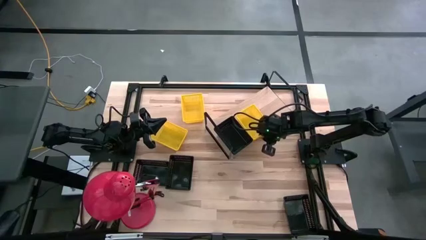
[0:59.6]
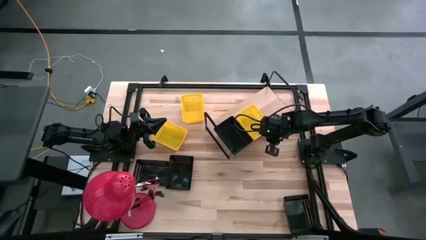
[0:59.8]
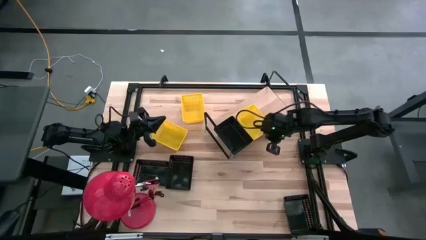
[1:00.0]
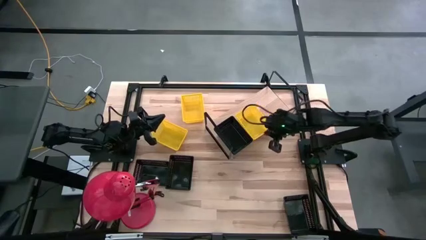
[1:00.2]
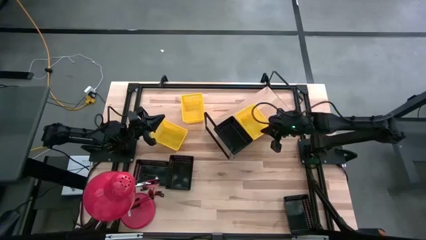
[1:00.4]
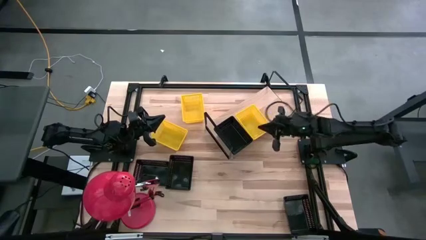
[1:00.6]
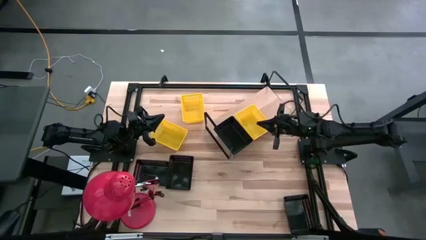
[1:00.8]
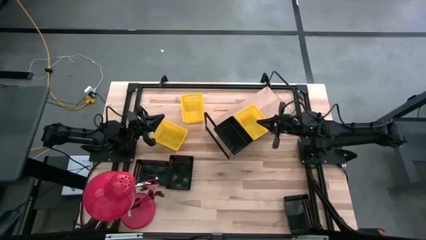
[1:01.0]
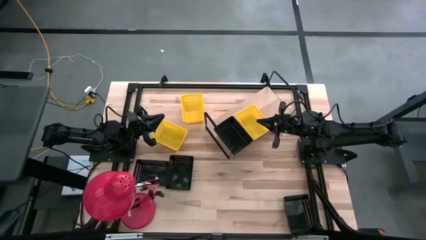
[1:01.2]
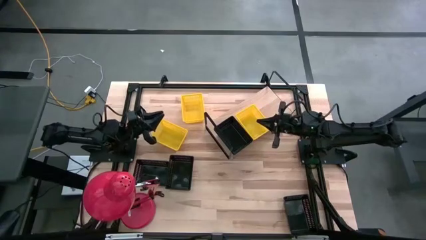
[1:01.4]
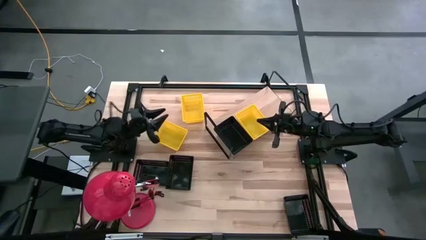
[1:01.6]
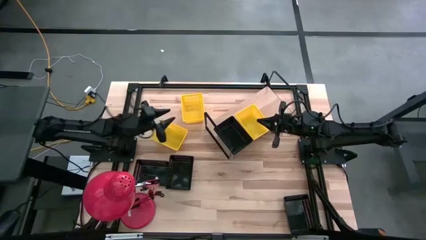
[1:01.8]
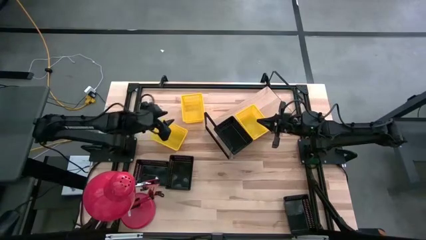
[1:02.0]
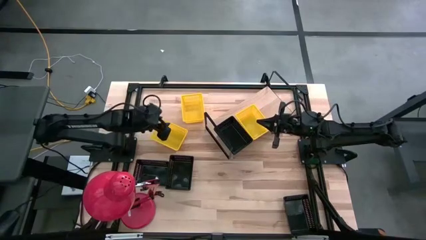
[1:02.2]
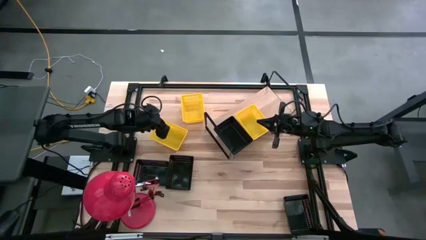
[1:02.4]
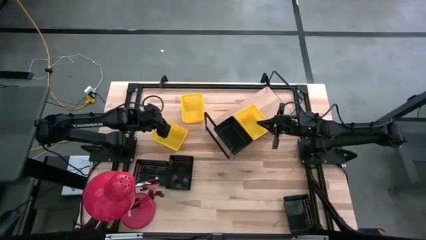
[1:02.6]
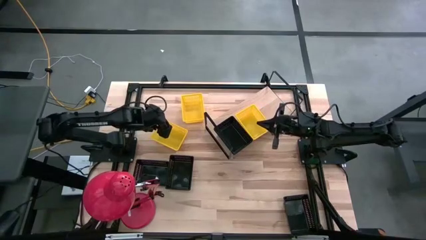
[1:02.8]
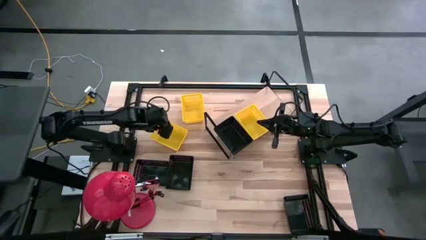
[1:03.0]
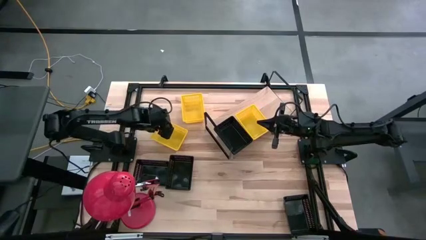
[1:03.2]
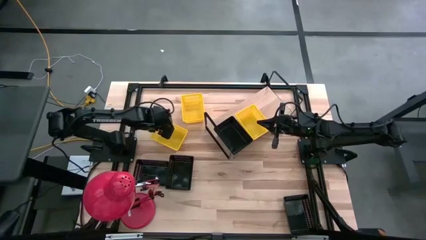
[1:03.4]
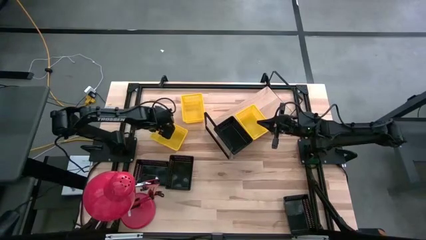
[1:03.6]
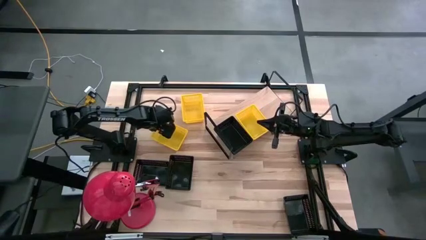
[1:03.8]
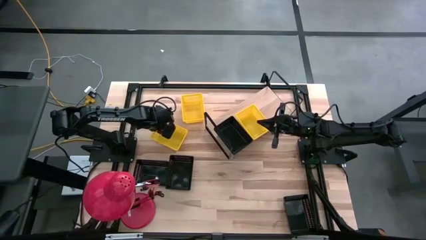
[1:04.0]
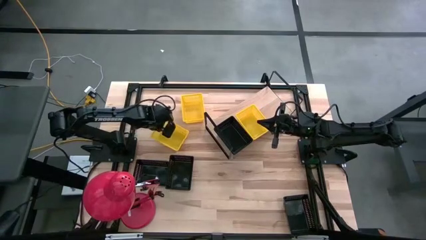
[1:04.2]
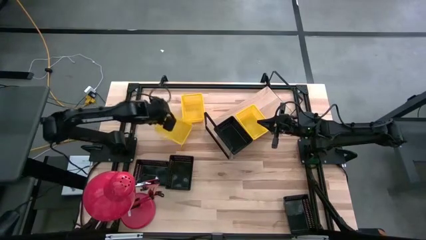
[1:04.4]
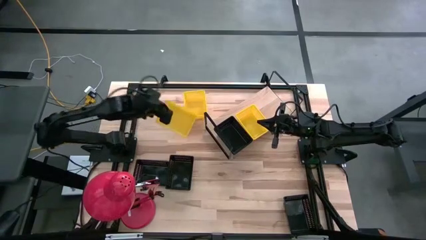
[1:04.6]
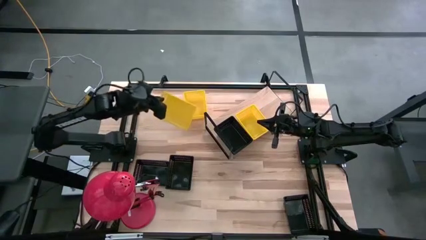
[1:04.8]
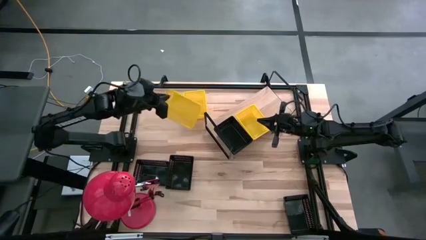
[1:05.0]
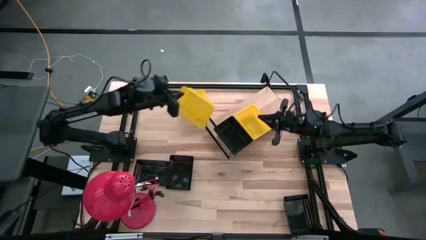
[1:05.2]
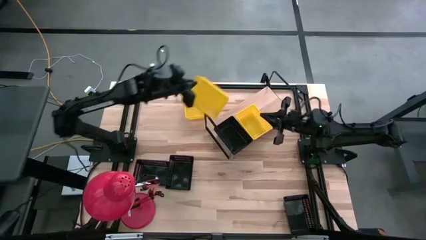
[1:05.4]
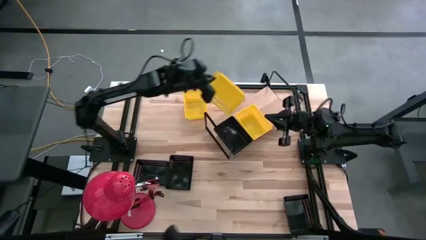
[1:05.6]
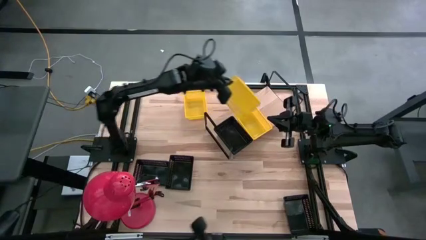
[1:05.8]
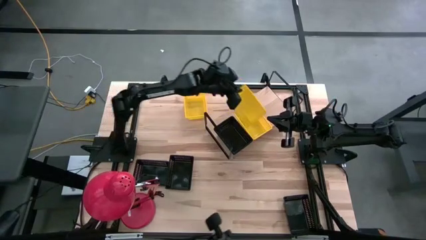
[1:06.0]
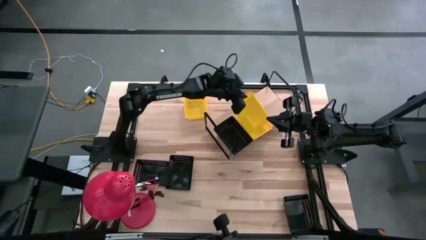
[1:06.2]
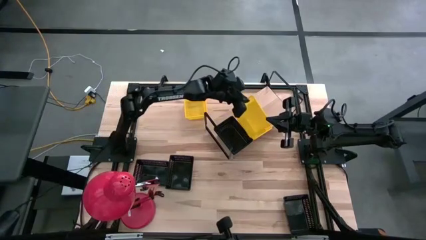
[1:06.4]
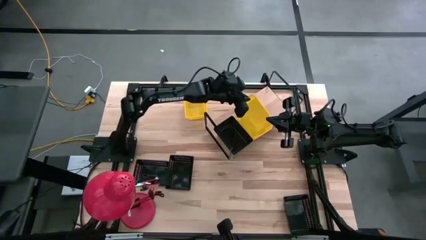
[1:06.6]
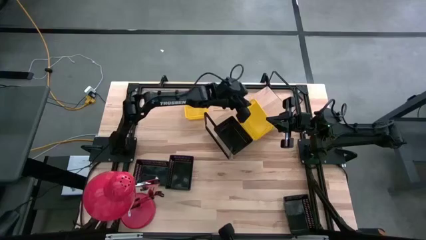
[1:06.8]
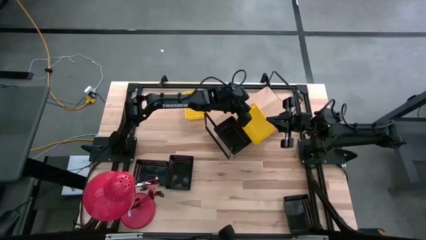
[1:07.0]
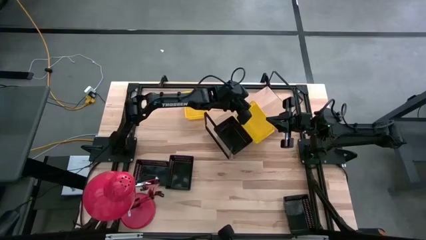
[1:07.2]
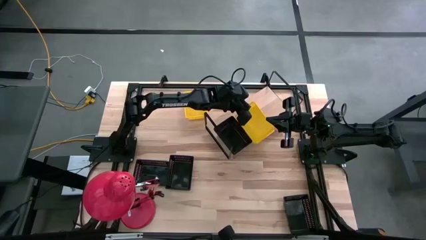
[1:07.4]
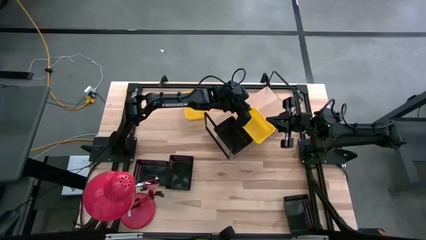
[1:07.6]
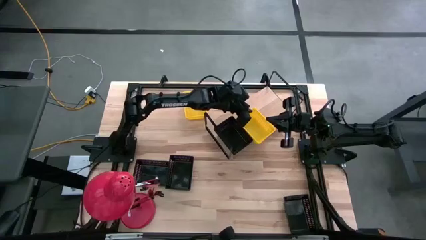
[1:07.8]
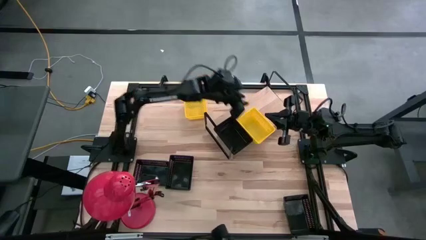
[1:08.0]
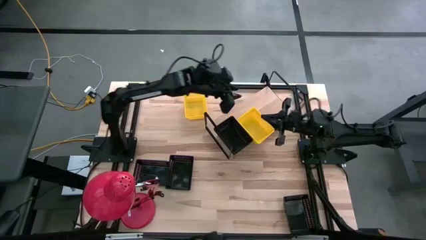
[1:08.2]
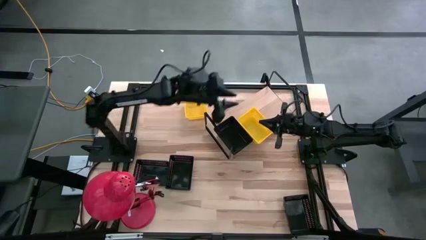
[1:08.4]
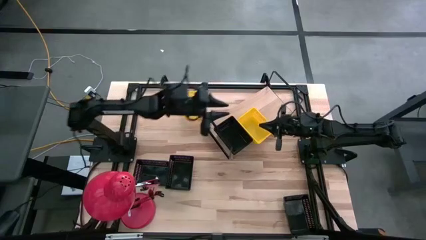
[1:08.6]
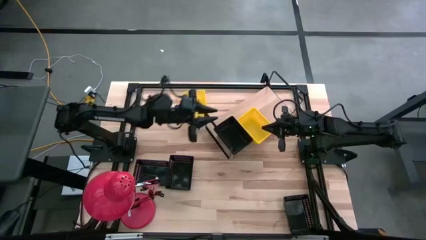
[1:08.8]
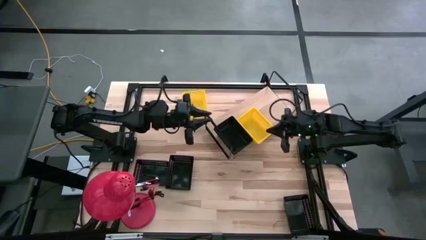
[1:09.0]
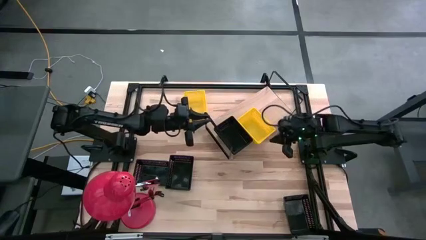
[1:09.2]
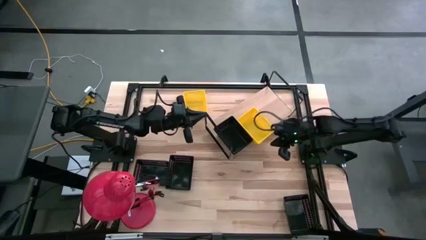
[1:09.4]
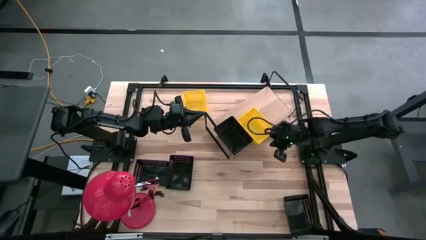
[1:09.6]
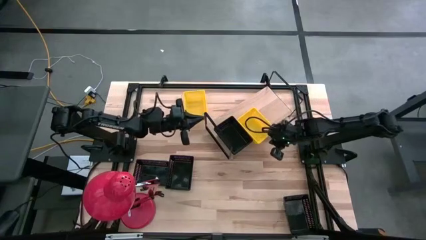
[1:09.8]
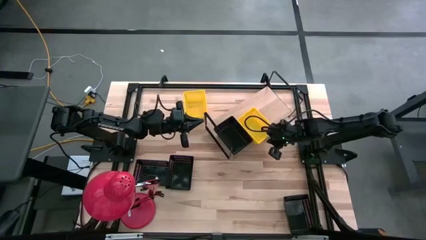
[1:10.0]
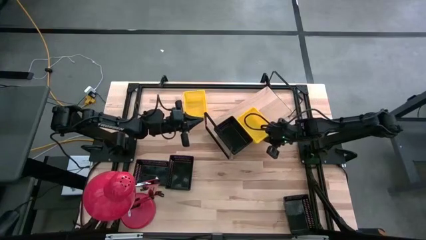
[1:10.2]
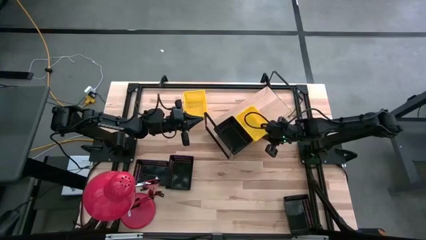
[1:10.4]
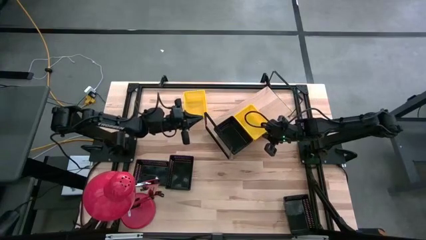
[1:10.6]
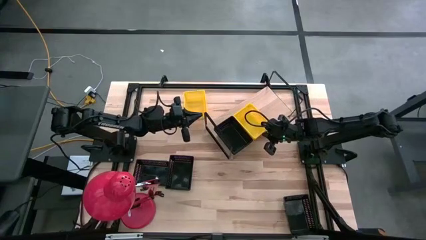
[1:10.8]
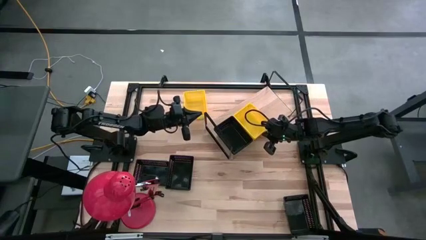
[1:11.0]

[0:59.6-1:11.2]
Task: Stack baskets on shelf by color
Stack the yellow bin on top of the yellow bin on the shelf
